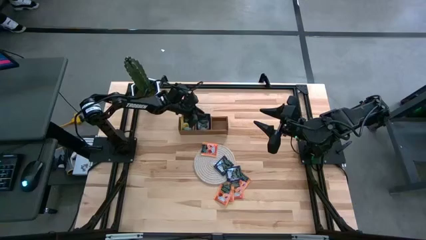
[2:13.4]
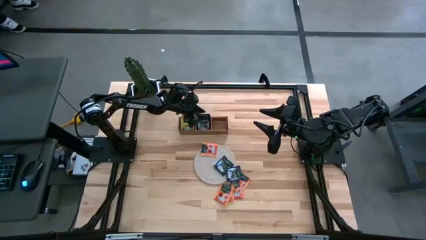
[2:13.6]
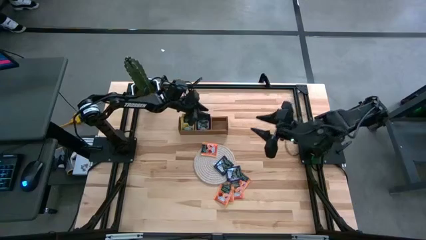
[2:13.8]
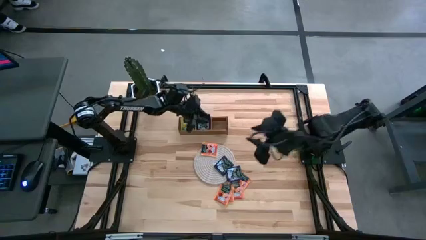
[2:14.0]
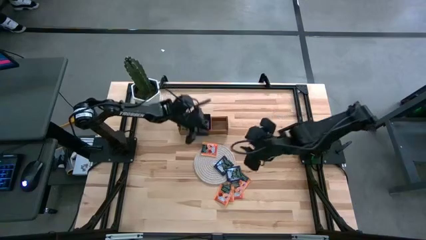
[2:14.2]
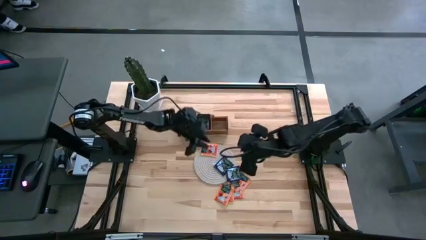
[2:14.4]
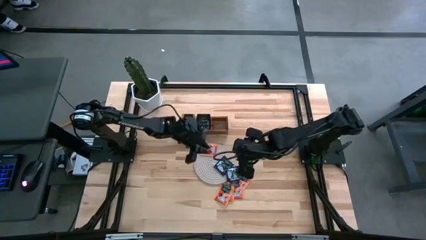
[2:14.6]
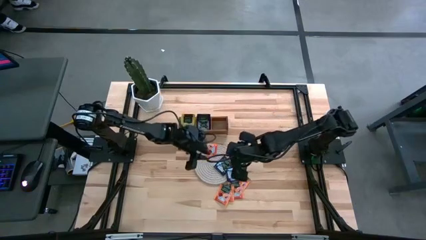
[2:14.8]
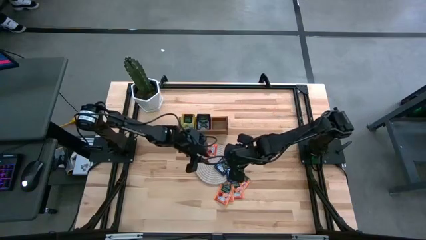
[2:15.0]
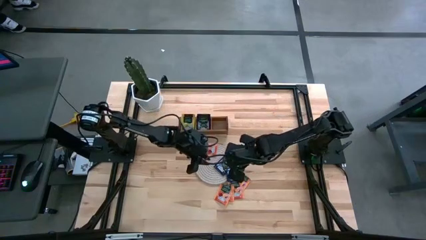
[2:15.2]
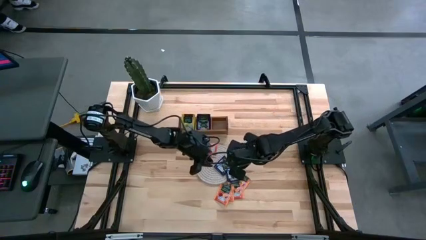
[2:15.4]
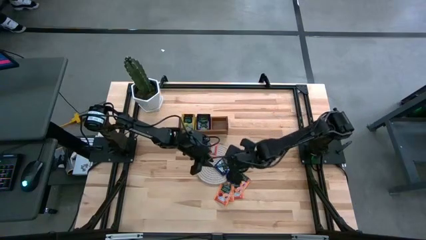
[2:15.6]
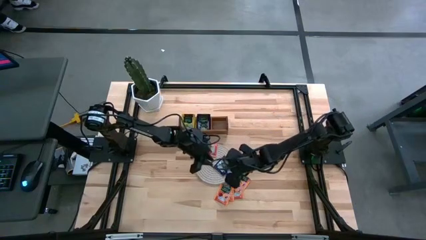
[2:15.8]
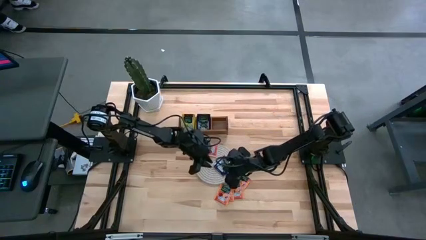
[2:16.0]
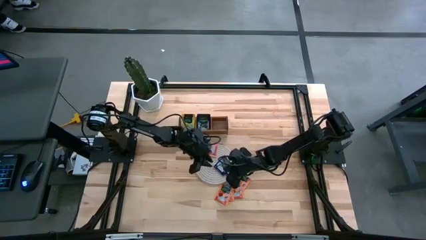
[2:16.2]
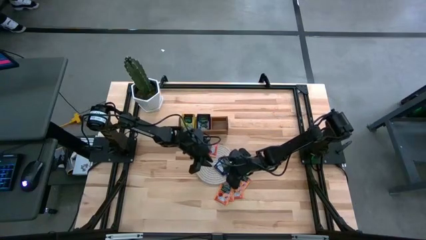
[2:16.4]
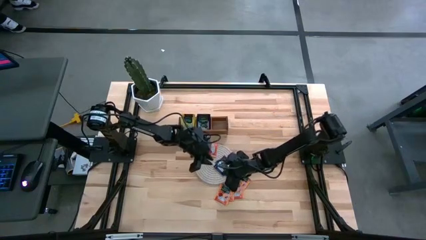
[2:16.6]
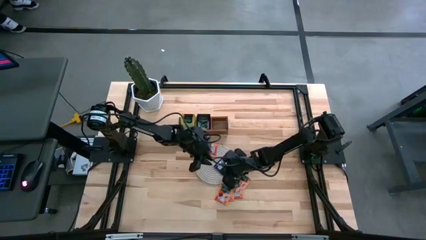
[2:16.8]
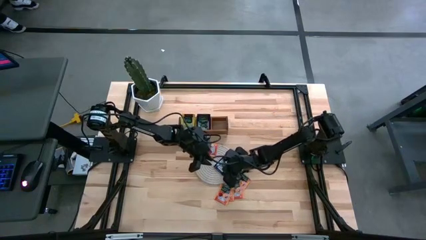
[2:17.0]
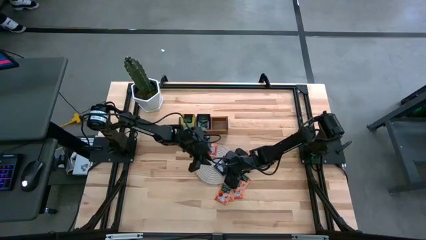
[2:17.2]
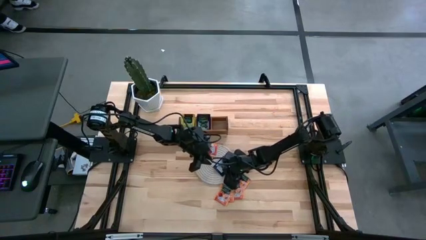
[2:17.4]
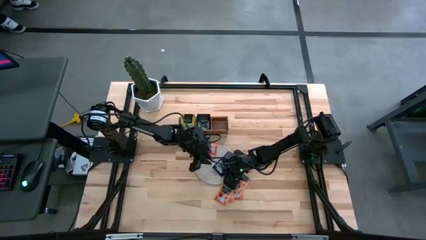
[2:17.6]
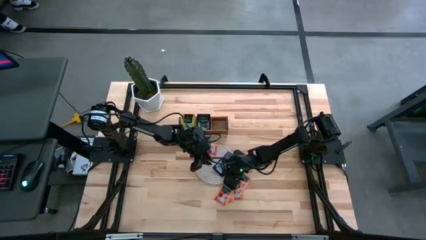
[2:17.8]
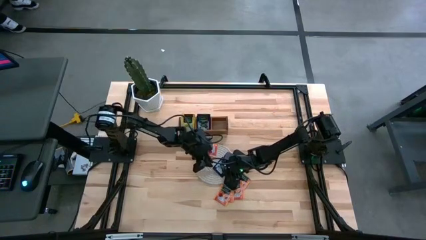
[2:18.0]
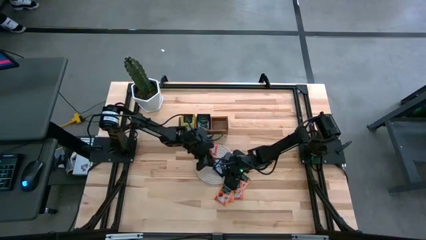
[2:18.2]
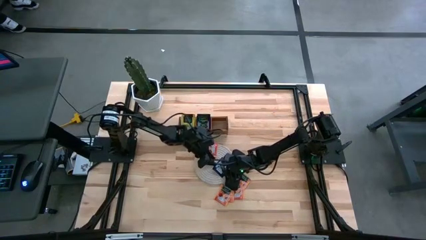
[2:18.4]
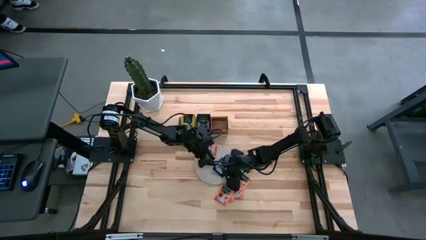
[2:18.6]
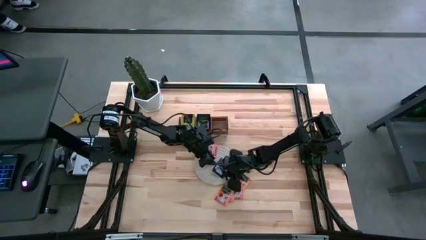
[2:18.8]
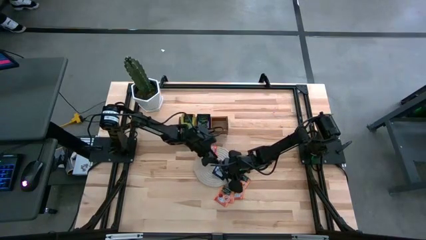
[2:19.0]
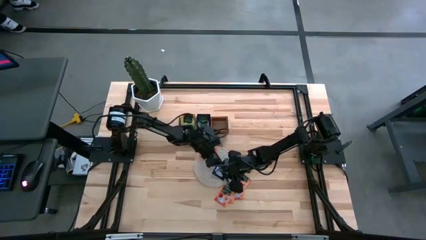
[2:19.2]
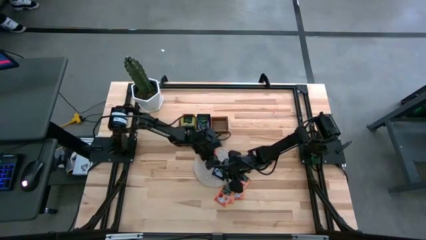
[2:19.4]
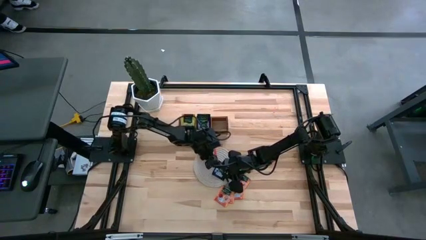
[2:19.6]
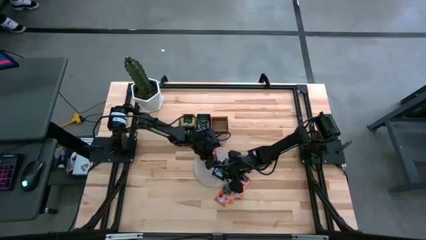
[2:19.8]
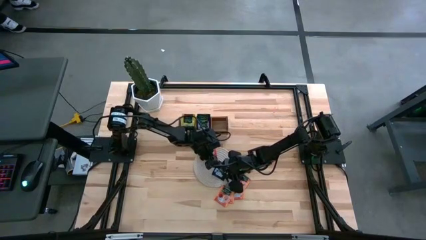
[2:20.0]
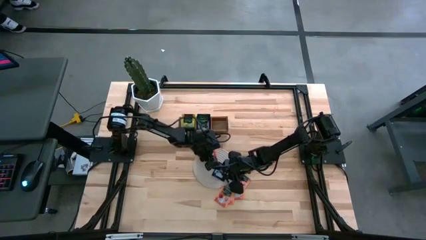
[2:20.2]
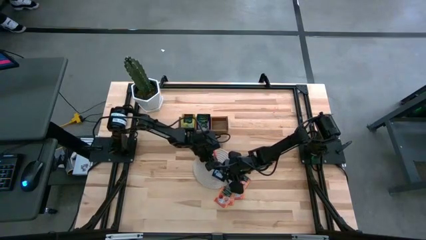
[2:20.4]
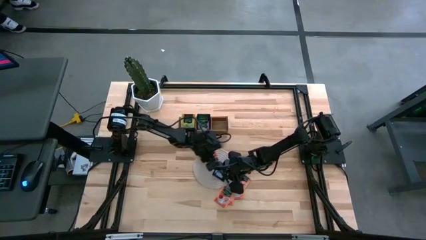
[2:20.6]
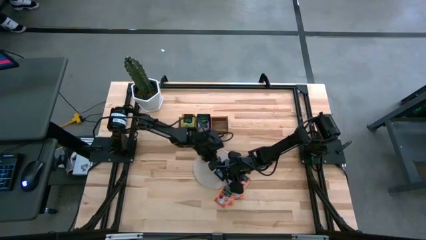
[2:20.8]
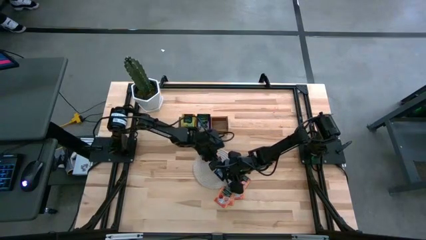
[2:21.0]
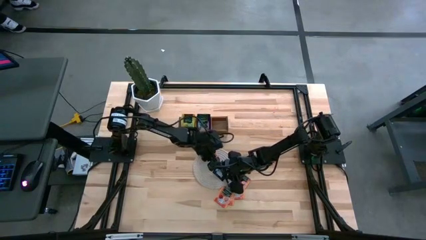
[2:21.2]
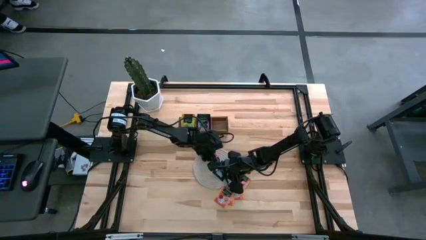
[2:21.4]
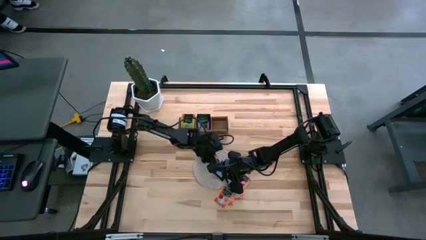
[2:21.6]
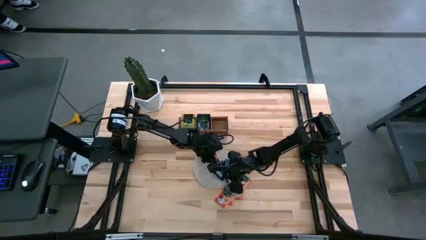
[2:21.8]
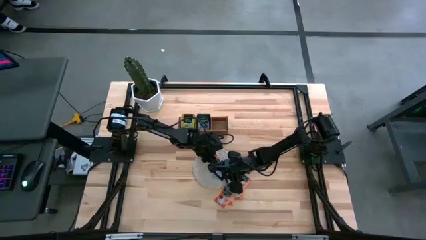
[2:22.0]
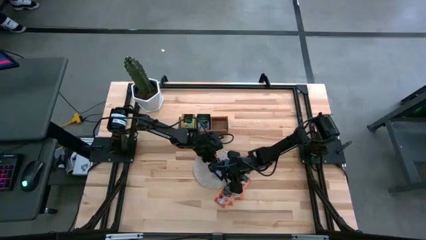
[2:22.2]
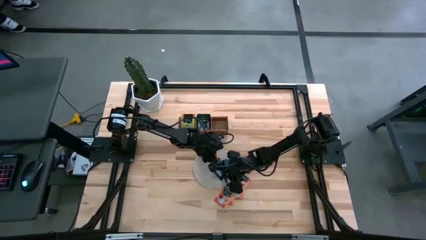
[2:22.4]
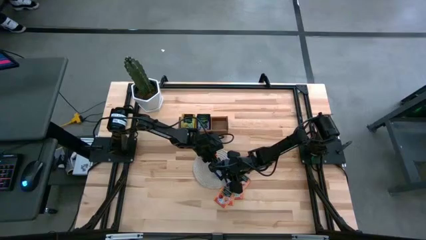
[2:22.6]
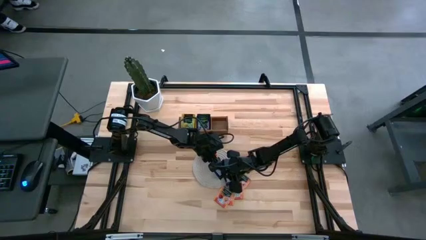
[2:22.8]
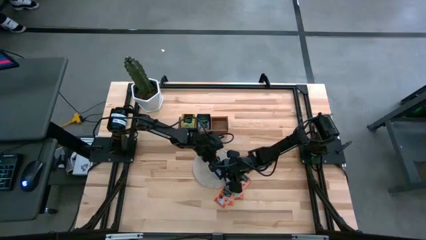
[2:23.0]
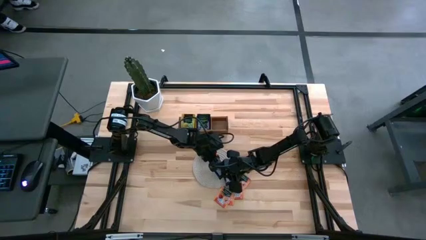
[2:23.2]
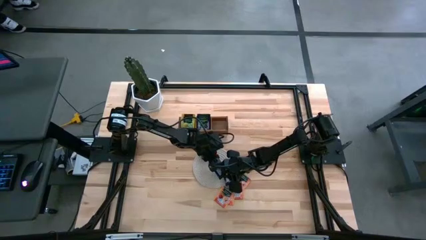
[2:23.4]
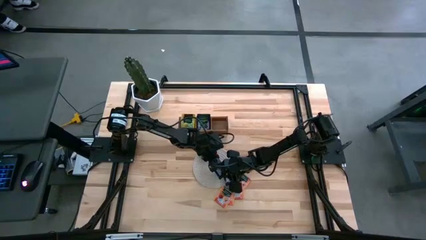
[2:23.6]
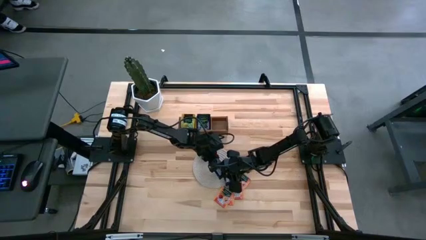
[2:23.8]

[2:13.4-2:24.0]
Task: Pick & Place Tea
Put the purple tea bag into the middle section of the wooden organizer

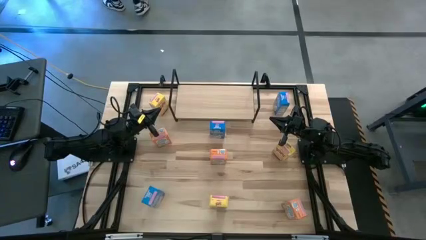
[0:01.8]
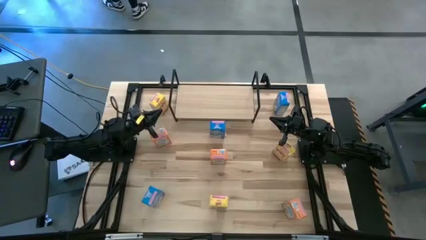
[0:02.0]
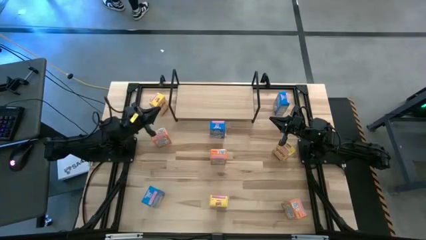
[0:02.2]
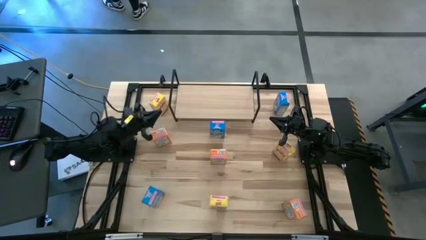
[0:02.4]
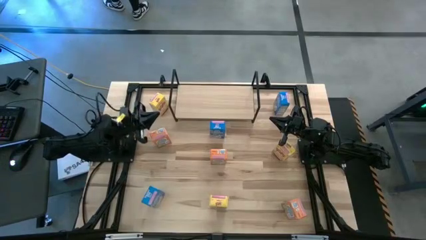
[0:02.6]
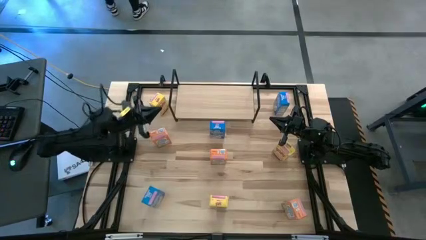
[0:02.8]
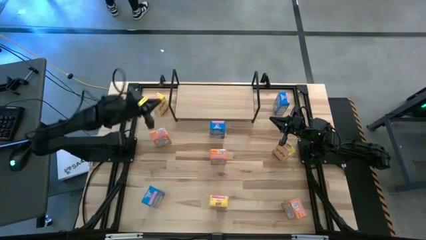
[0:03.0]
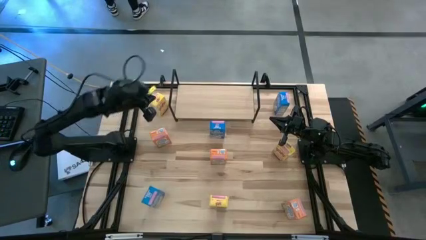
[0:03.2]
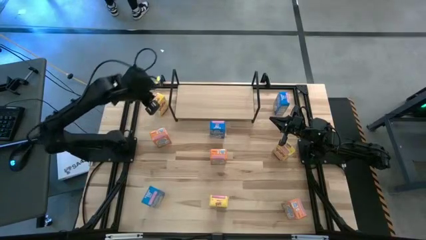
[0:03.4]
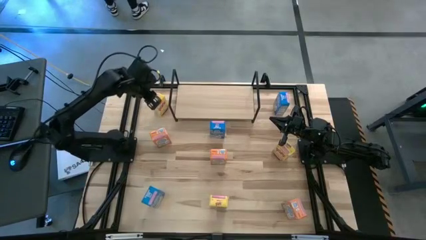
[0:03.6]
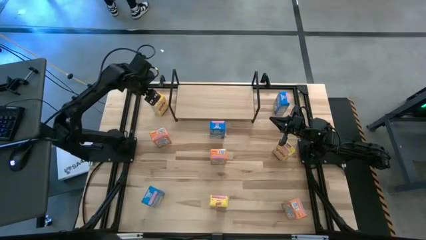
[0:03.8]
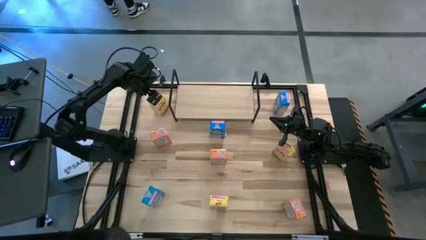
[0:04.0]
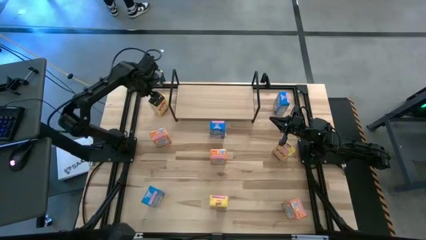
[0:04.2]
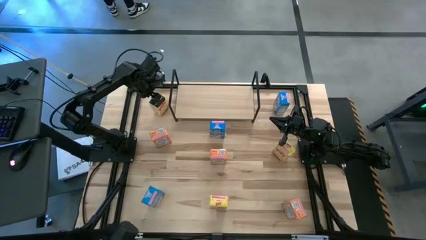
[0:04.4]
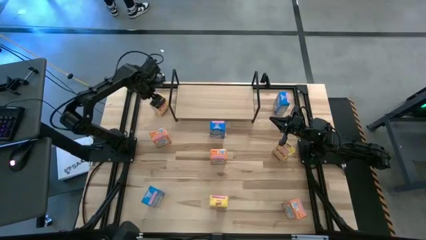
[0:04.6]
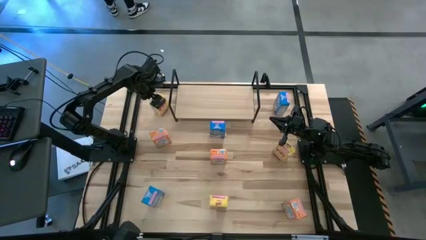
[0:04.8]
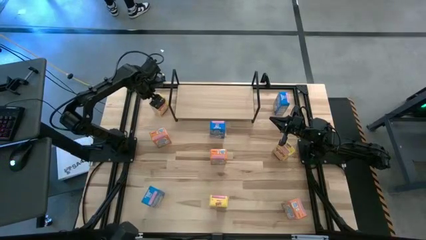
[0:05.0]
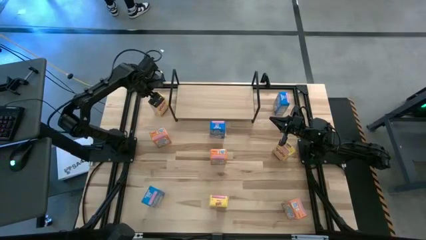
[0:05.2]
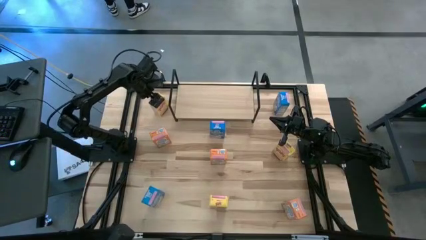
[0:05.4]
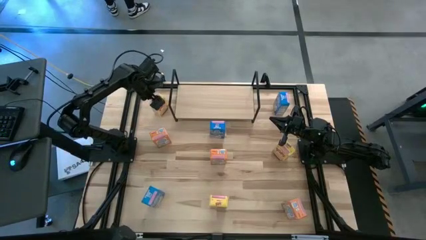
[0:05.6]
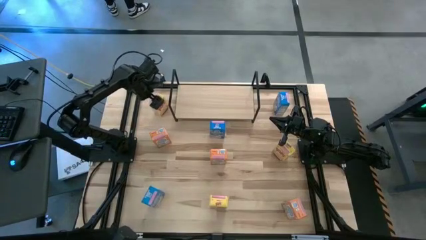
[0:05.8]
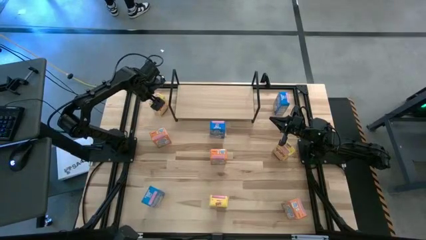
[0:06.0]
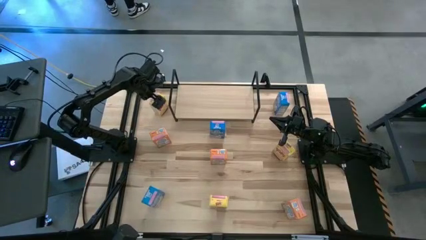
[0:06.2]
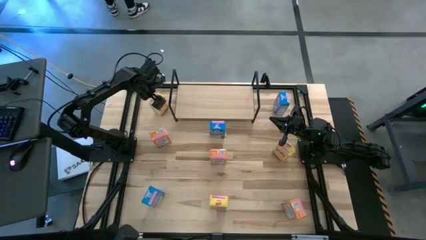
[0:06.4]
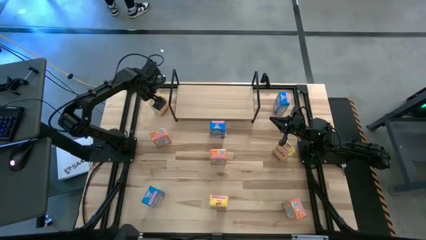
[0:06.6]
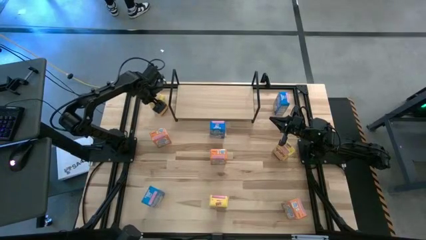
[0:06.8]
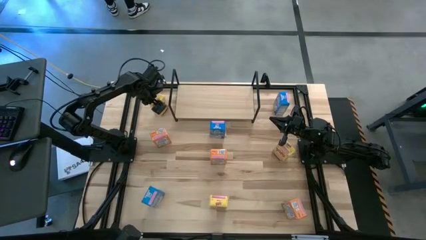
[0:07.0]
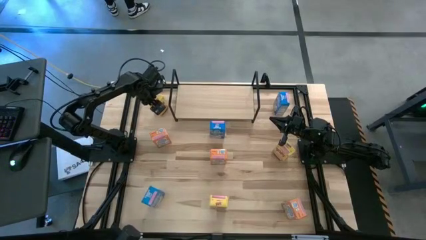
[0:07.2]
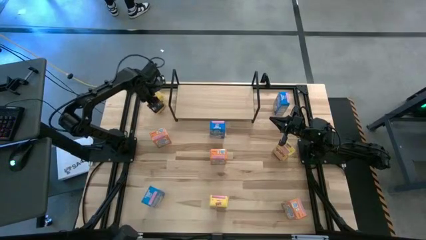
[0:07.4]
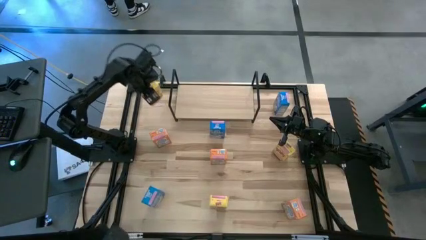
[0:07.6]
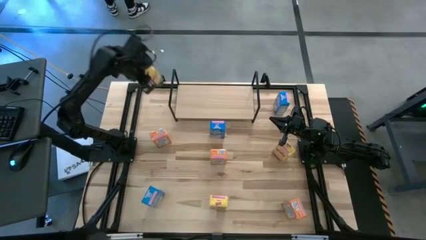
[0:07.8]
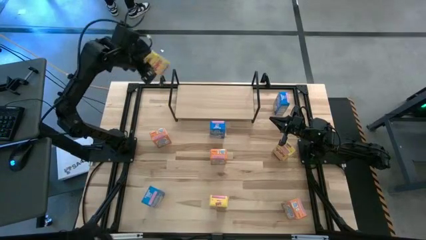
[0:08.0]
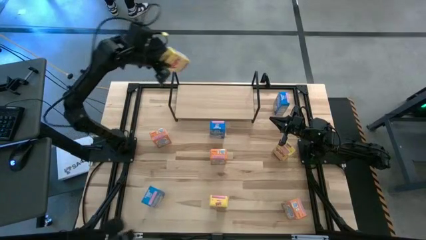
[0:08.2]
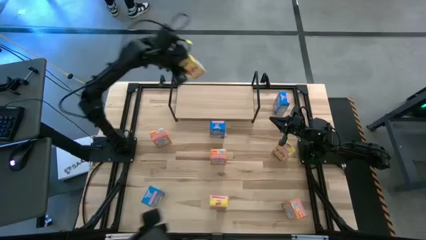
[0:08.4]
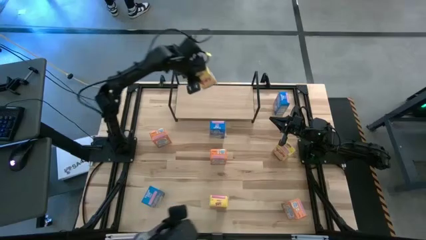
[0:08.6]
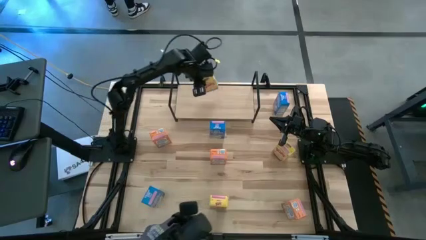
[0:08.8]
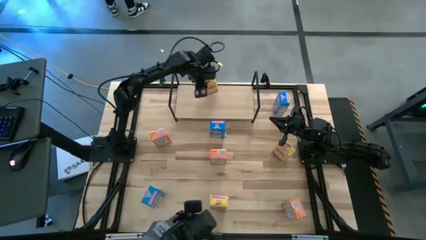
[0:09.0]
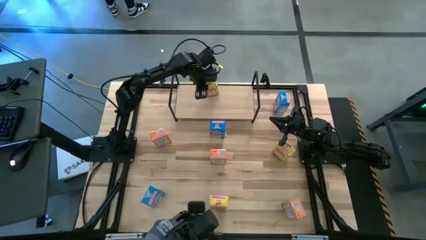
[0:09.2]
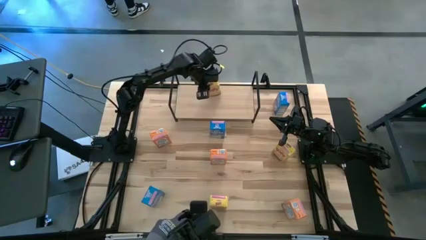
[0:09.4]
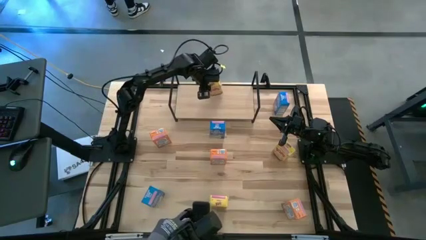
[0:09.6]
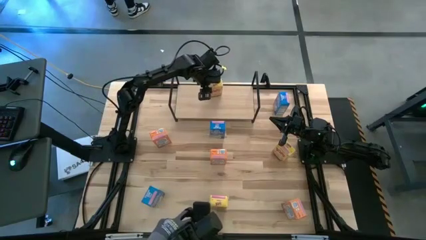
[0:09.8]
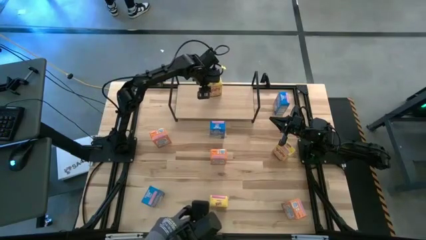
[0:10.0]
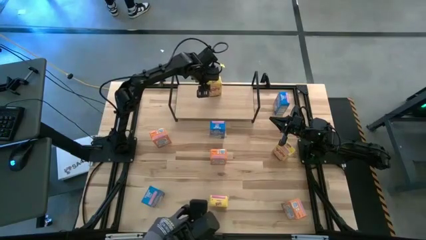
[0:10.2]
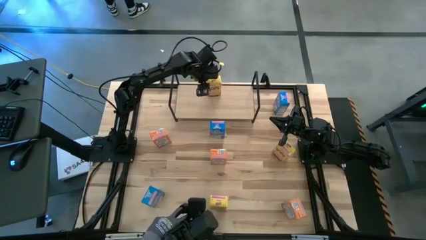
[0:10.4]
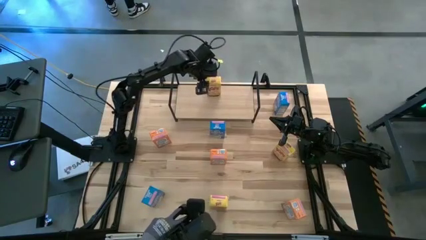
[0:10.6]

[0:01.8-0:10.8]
Task: Stack cereal on shelf
Put the left yellow cereal box on the shelf
